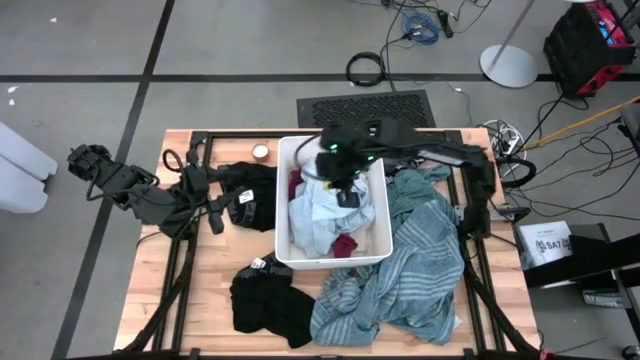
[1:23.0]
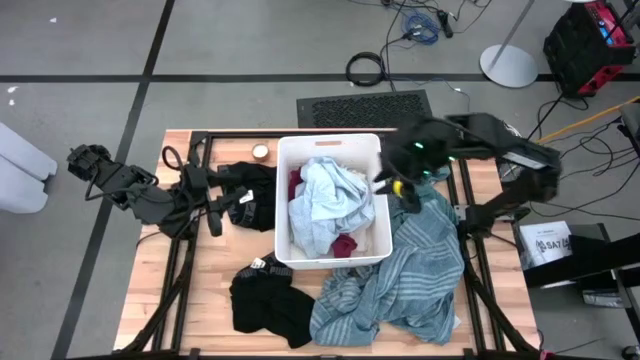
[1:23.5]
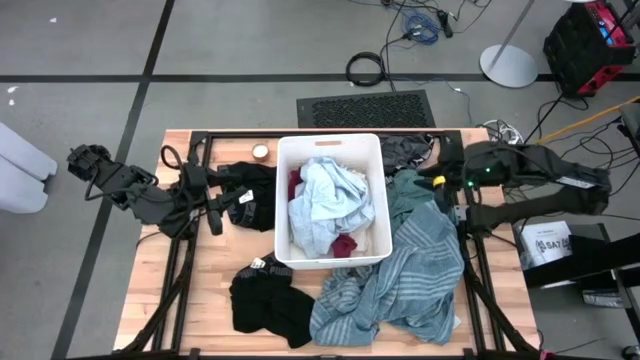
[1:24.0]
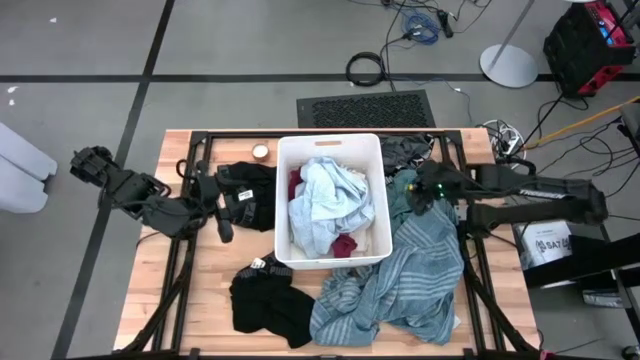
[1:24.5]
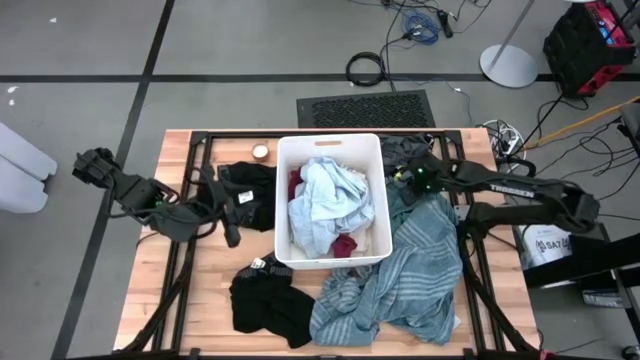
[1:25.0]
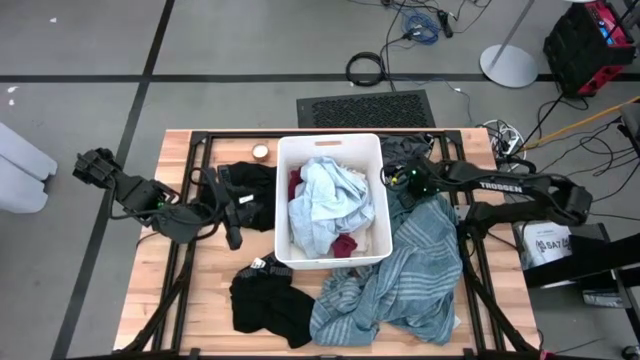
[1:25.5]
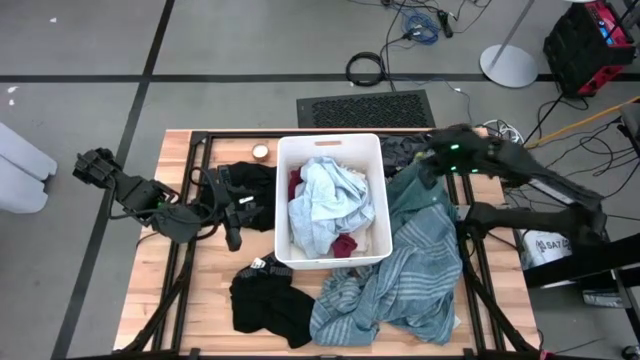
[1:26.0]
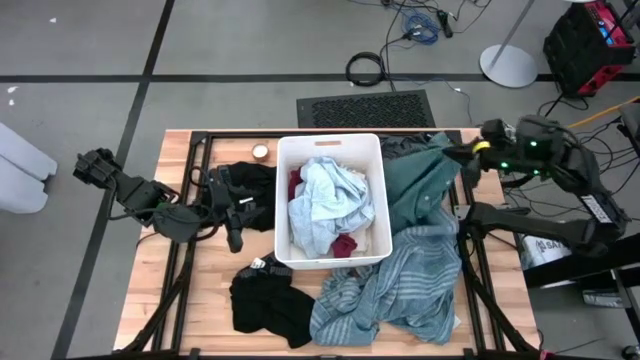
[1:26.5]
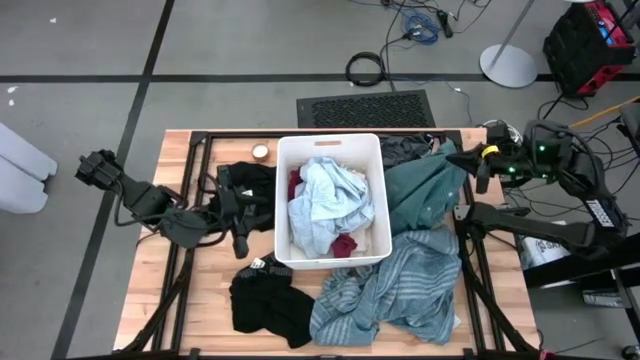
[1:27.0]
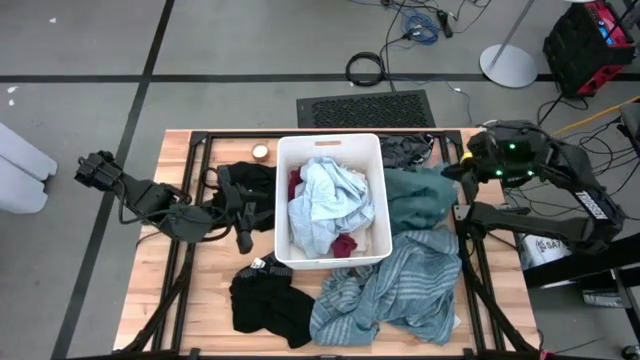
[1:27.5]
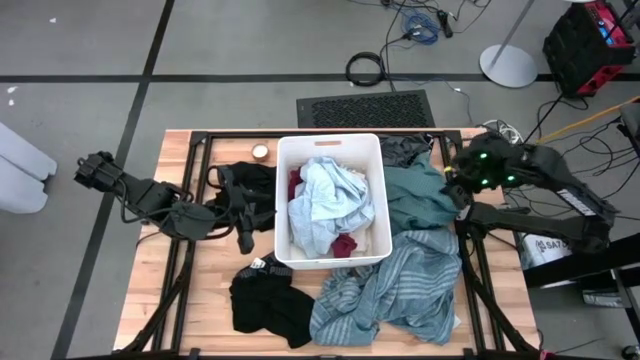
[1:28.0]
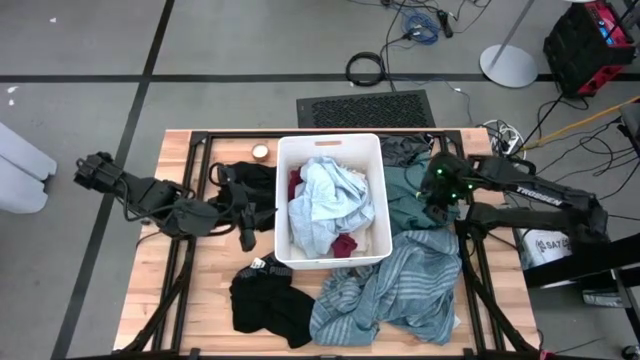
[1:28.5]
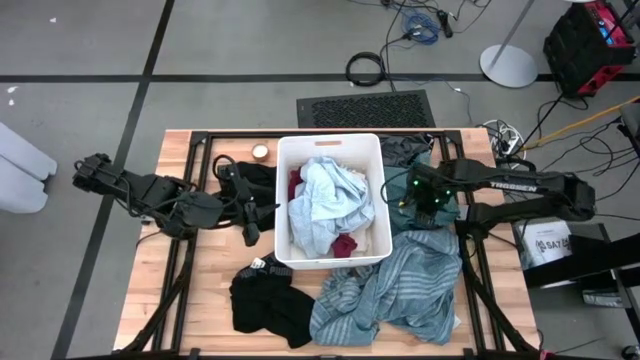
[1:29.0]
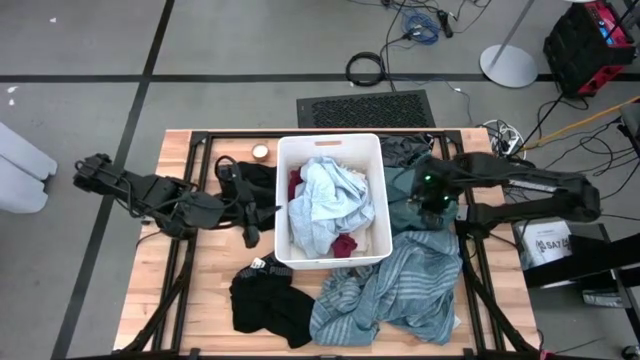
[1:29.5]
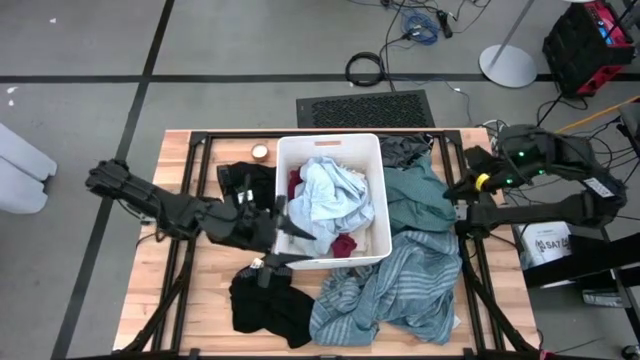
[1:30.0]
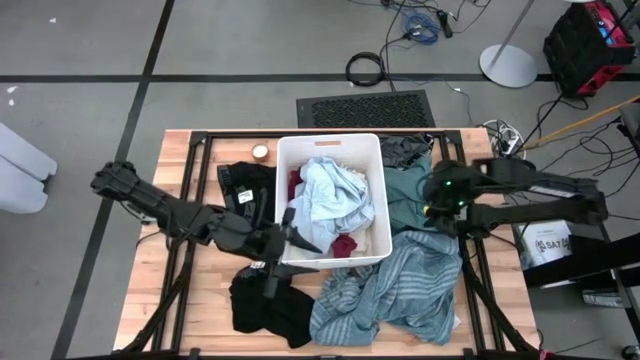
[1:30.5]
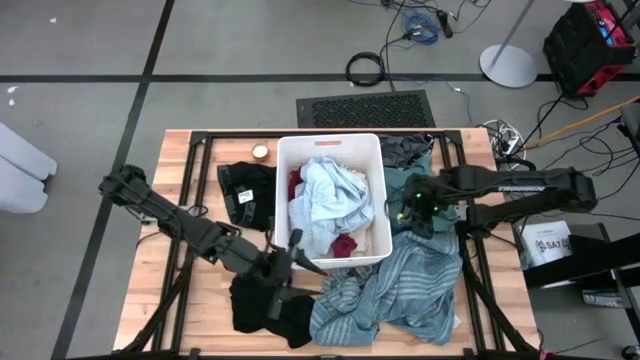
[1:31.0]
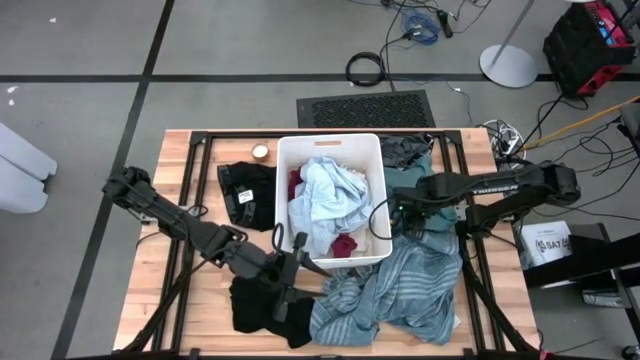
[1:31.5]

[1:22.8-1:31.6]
Task: Sort clothes
Put the green patterned shirt into the laundry bin

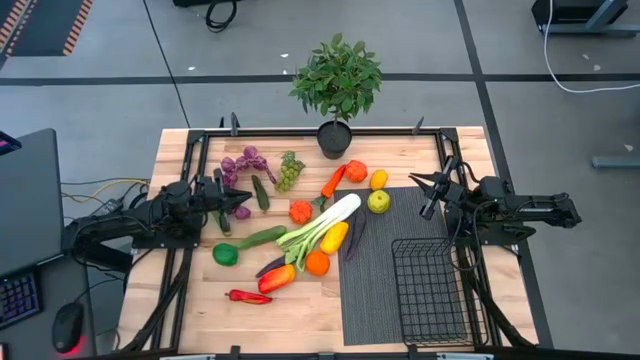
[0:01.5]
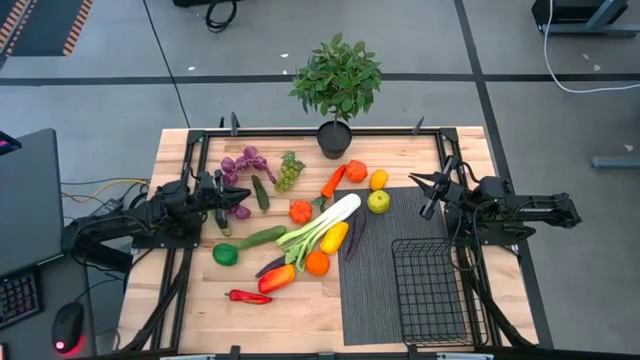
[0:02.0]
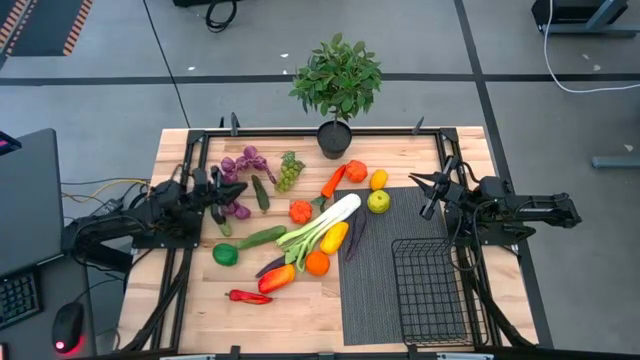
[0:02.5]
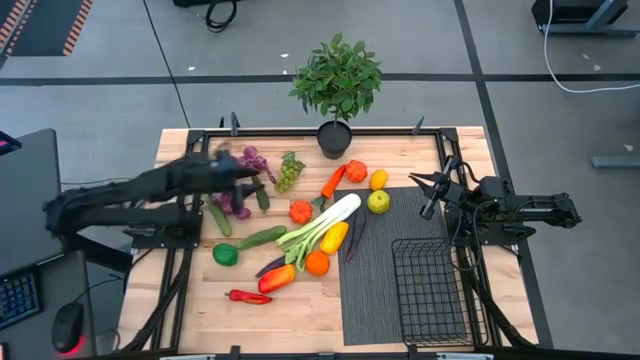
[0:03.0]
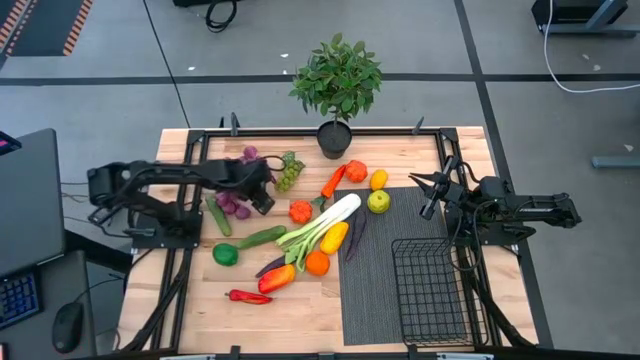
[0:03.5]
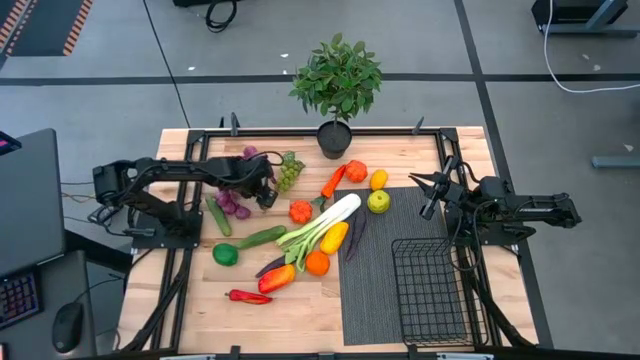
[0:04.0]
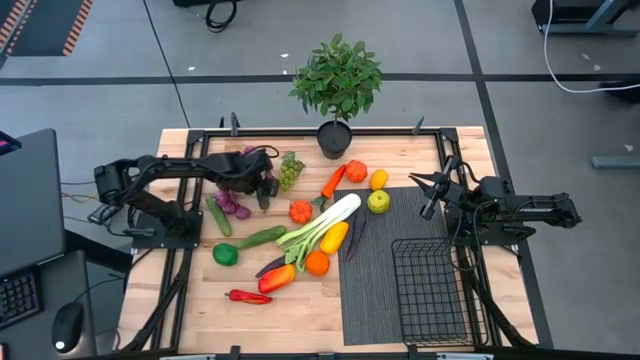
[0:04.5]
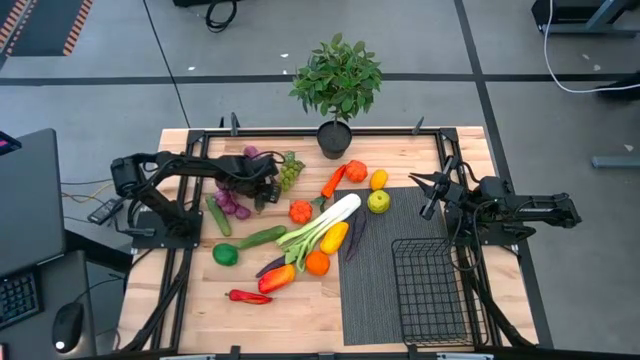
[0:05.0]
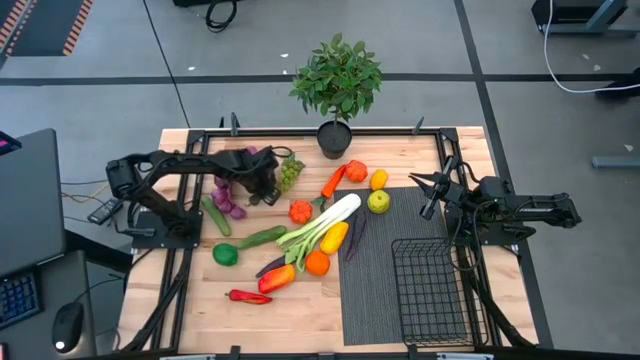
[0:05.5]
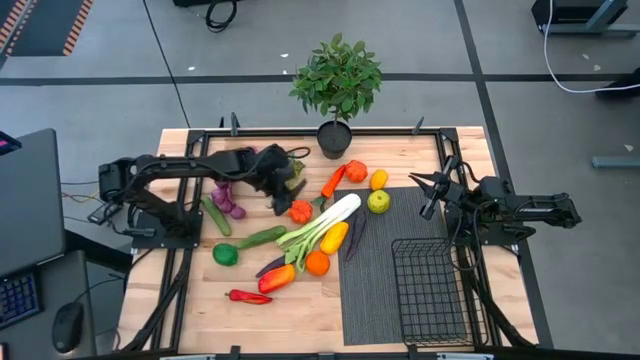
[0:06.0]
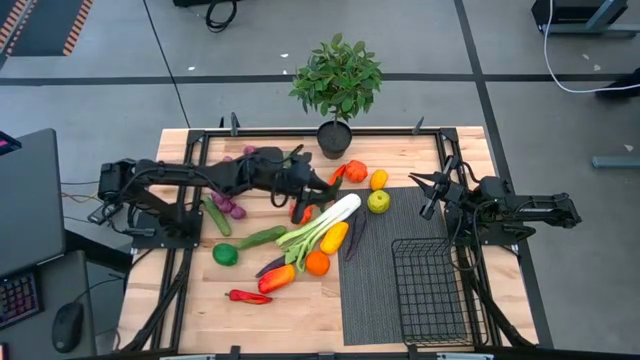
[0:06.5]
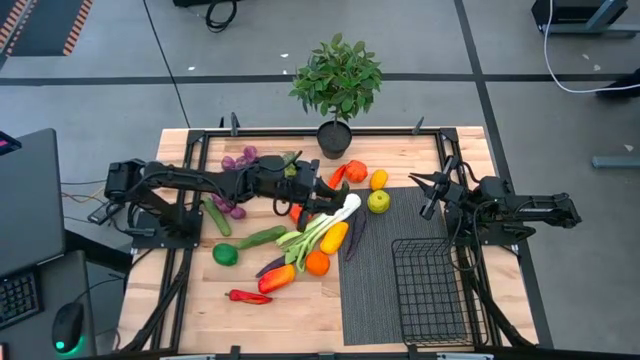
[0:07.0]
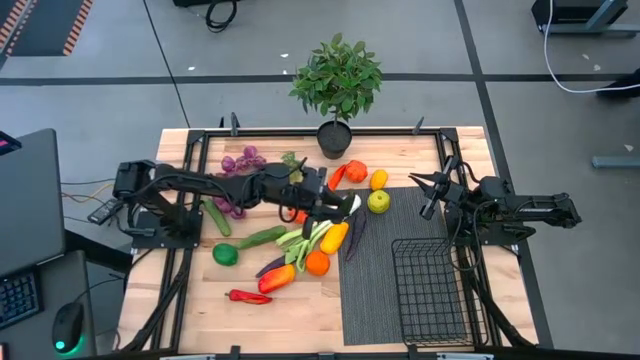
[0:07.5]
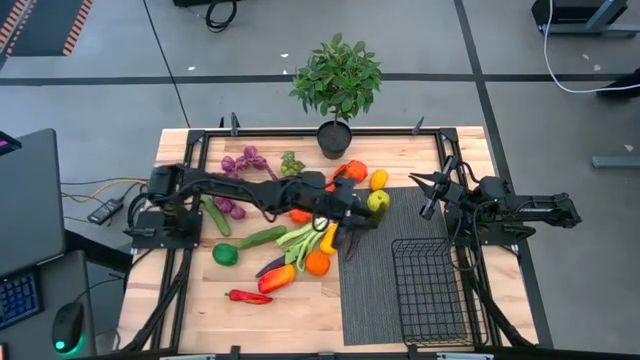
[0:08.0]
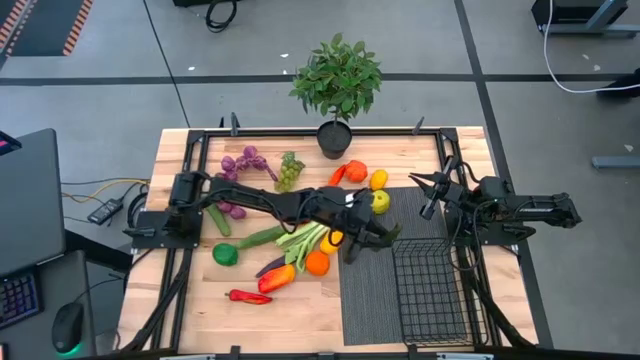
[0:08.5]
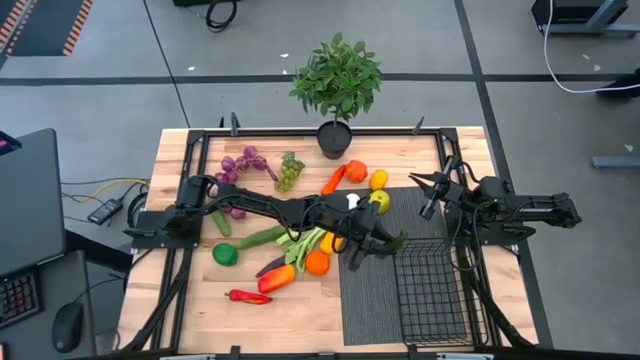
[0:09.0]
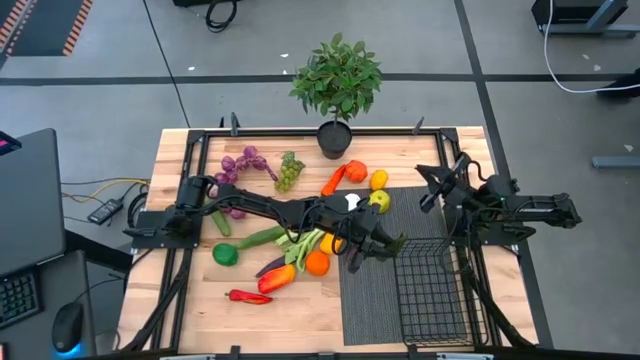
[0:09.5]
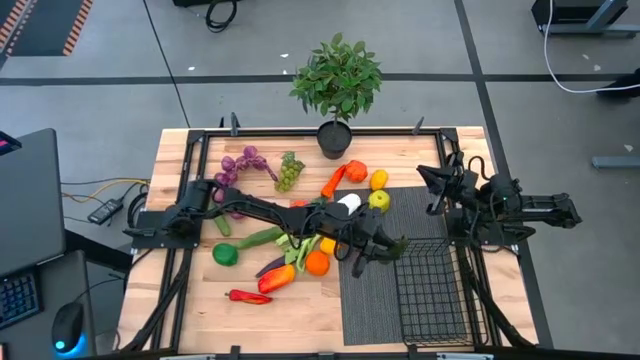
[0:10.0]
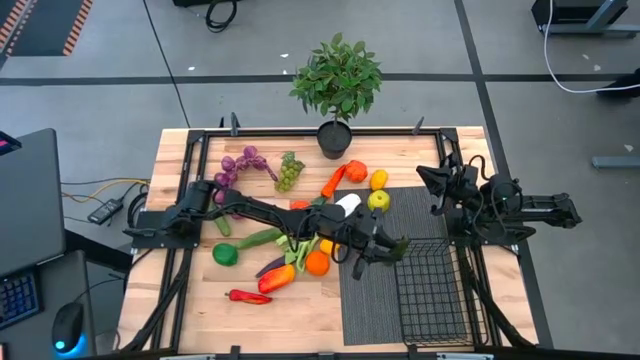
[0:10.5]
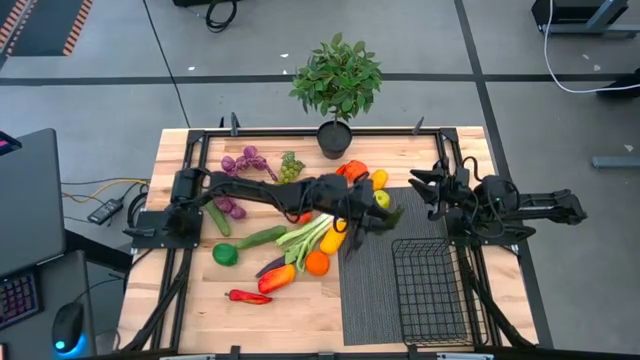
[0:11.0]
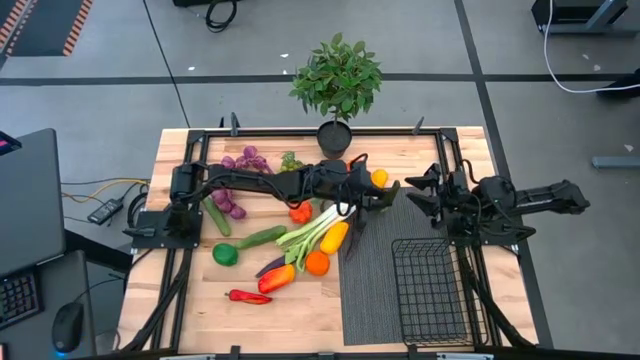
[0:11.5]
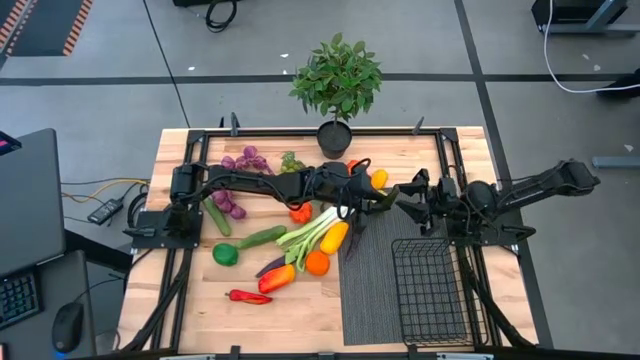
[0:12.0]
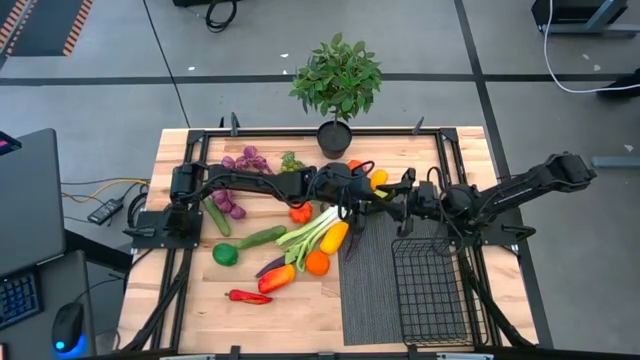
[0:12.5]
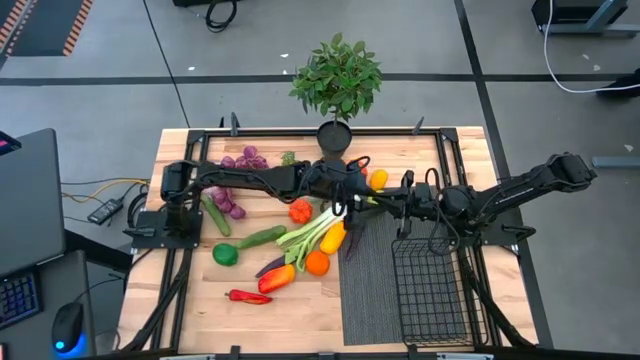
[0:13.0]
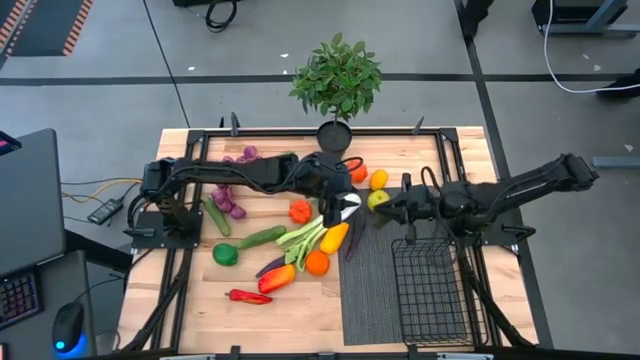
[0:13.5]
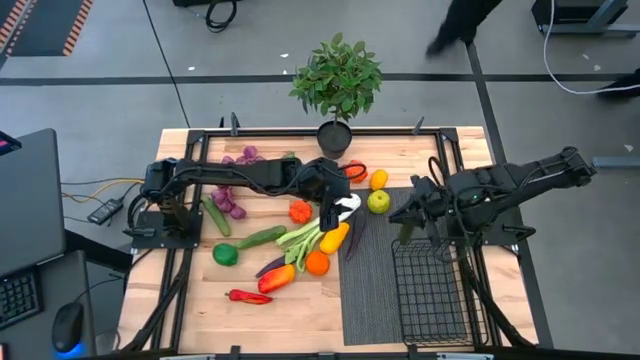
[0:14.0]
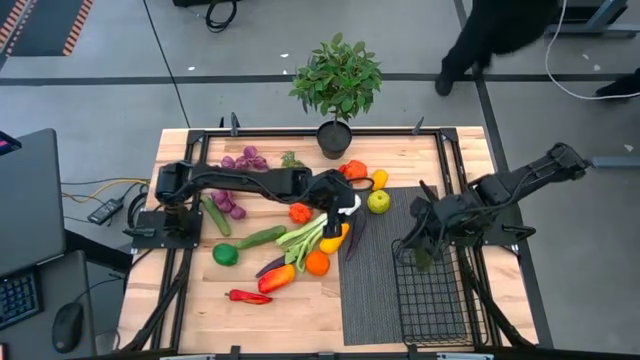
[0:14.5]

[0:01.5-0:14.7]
Task: Build produce basket
Put the top cucumber into the black wire basket
